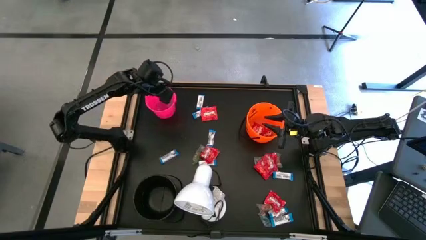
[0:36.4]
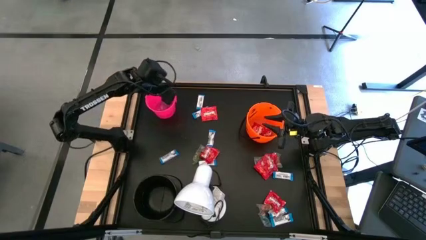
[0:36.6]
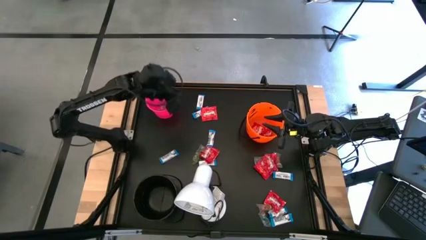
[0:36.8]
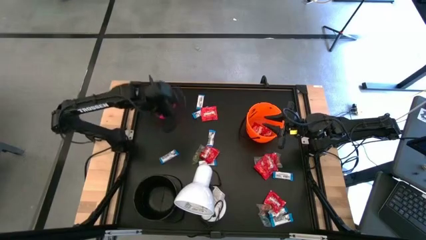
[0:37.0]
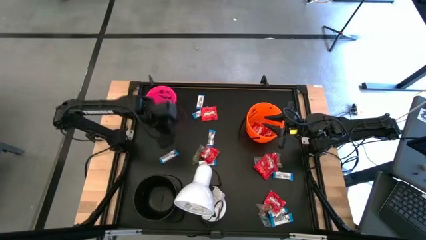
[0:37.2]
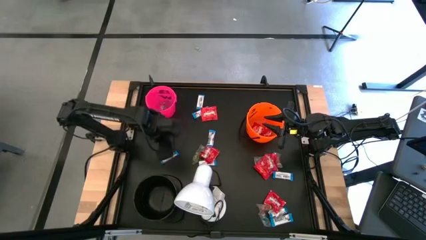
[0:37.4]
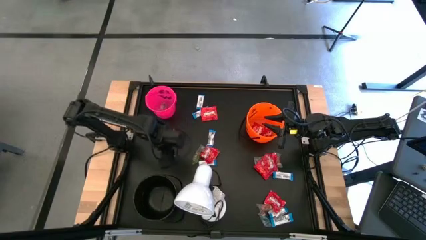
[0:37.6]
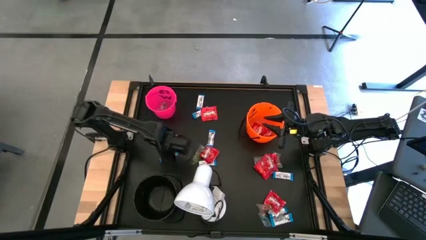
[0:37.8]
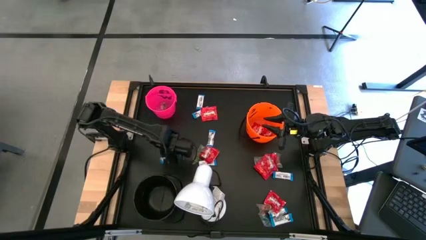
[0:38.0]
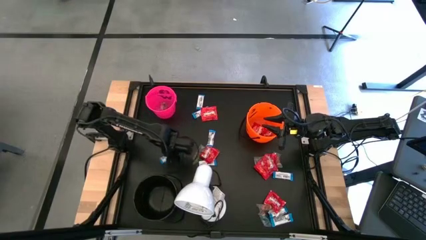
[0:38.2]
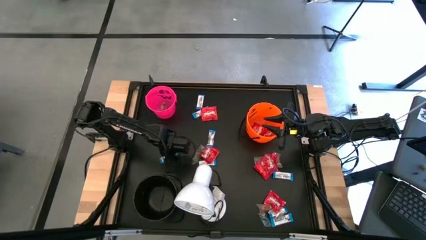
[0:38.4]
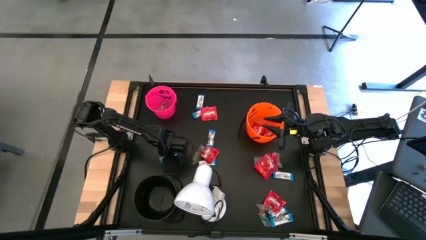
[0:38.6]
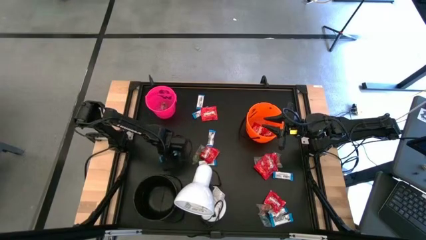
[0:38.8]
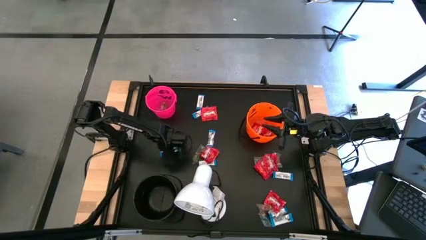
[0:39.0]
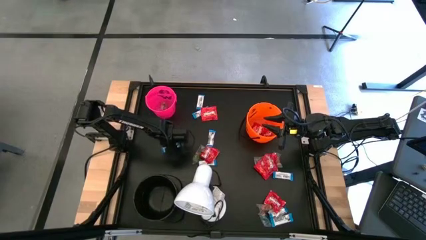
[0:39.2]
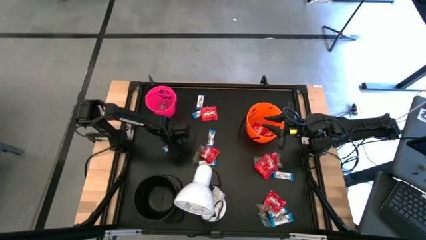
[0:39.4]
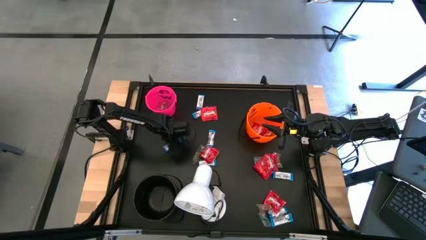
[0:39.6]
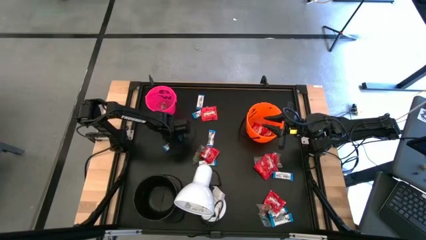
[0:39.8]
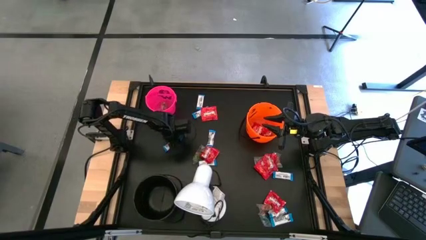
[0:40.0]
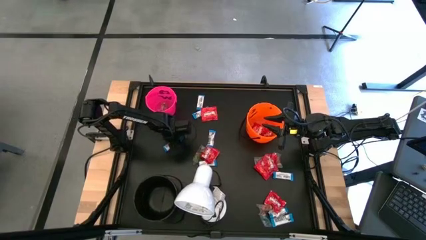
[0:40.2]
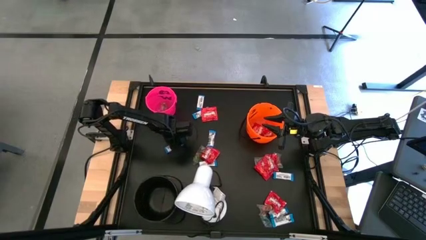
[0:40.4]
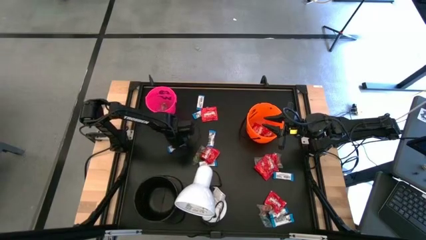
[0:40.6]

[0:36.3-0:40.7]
Task: Sort candy
Put the white chocolate into the black bucket

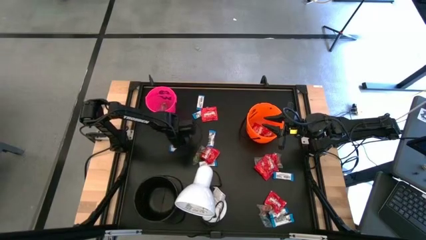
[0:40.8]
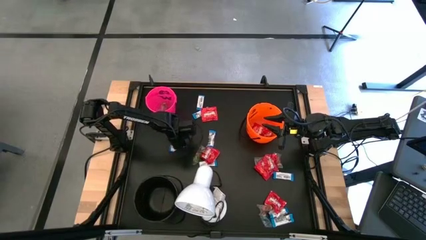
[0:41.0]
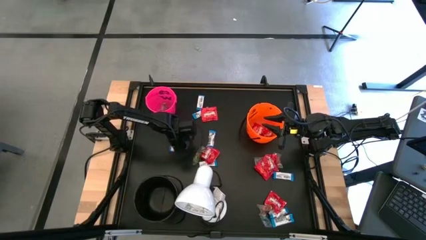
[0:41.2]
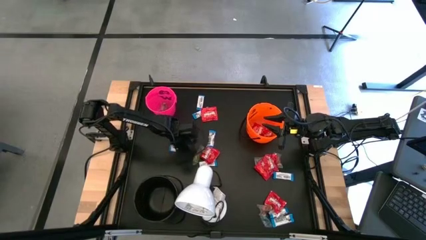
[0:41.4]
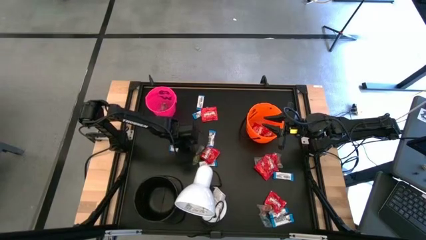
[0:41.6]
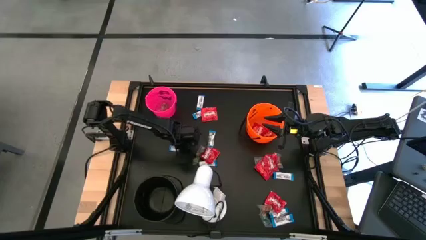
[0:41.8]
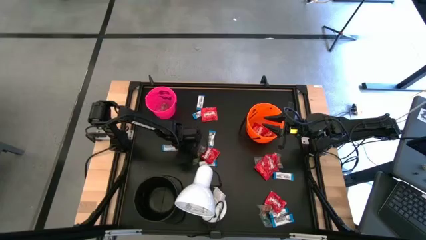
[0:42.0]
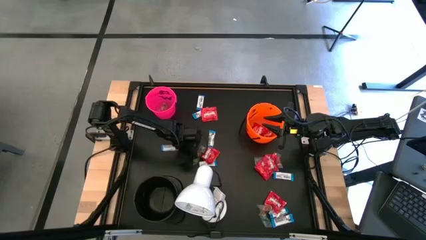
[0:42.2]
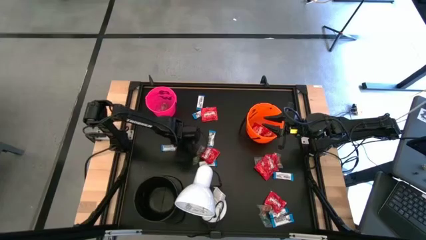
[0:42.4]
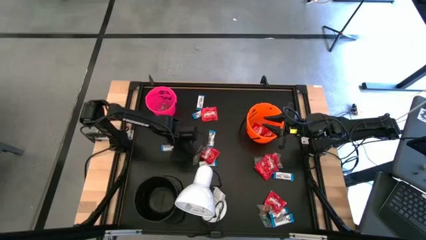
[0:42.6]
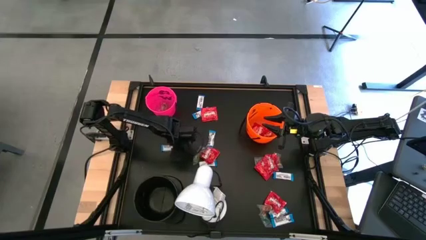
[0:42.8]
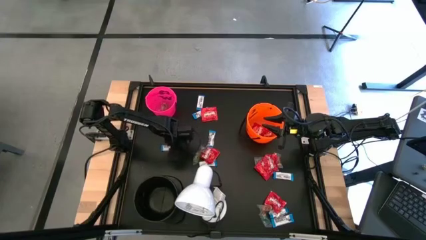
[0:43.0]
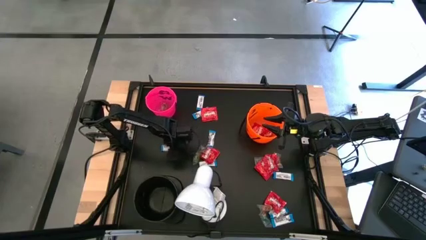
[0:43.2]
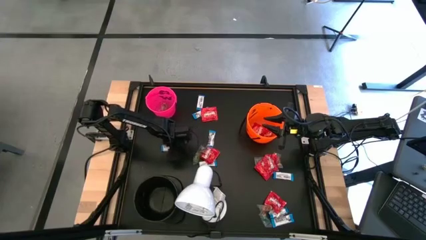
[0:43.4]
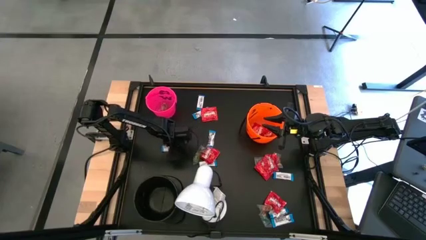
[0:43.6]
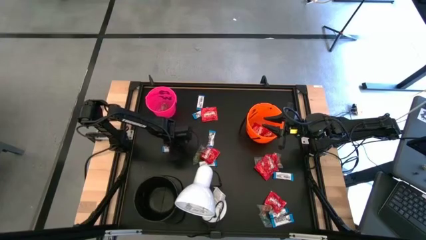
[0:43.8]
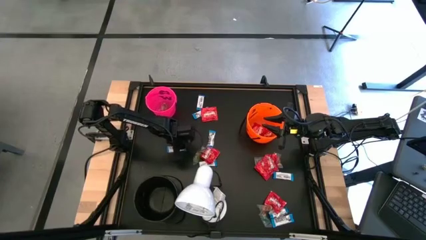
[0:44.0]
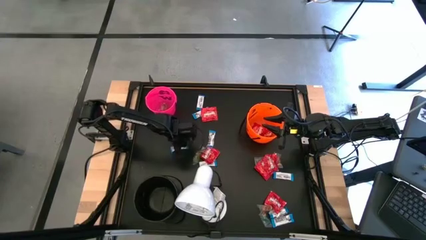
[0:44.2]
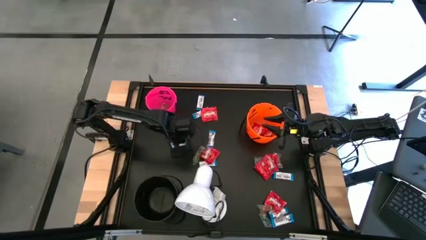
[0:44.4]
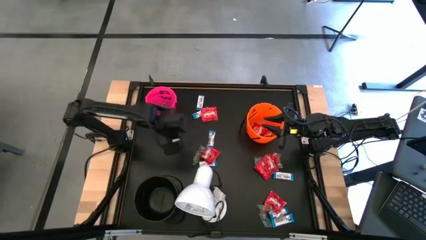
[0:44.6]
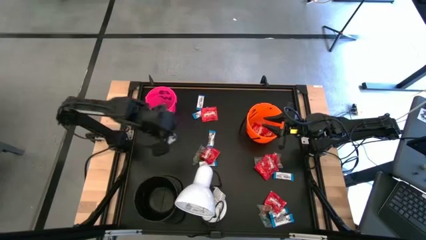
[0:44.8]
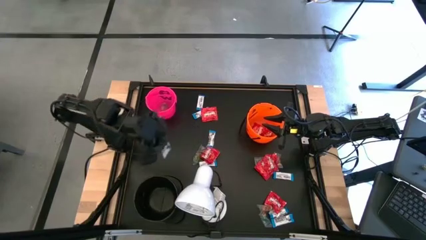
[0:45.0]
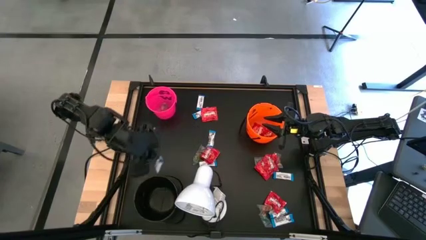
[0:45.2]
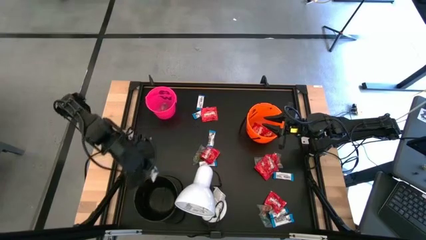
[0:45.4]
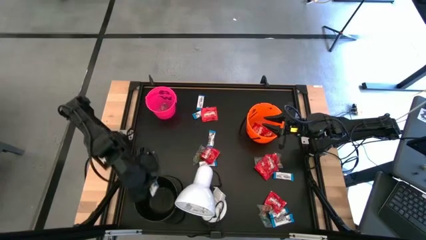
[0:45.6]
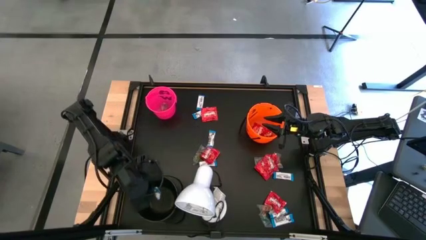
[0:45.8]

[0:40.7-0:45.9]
Put the white chocolate into the black bucket

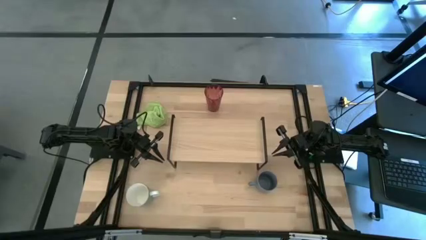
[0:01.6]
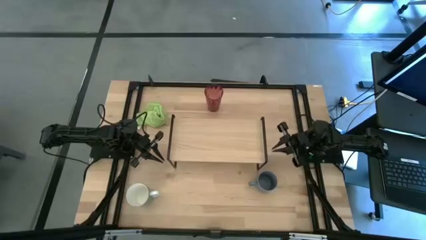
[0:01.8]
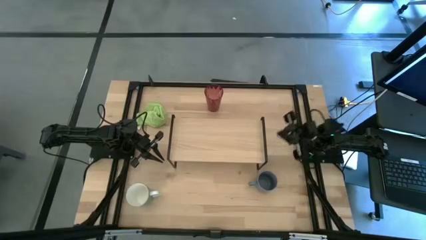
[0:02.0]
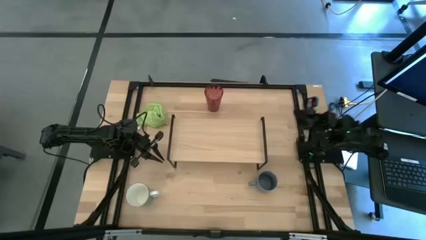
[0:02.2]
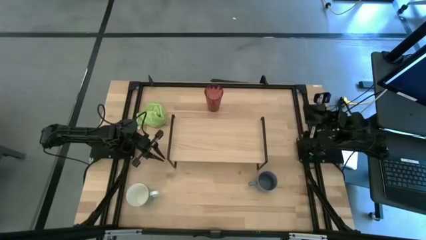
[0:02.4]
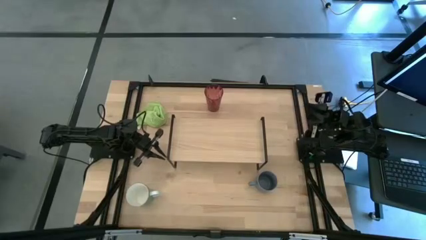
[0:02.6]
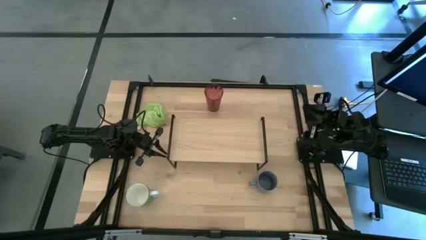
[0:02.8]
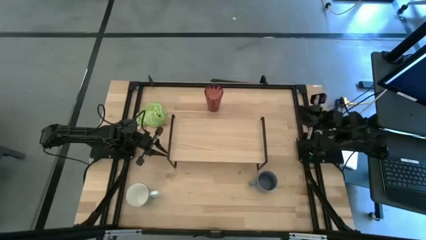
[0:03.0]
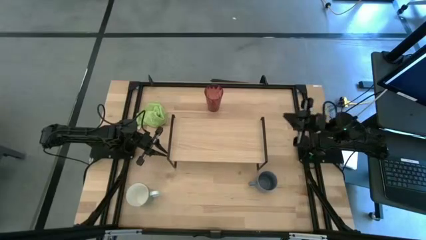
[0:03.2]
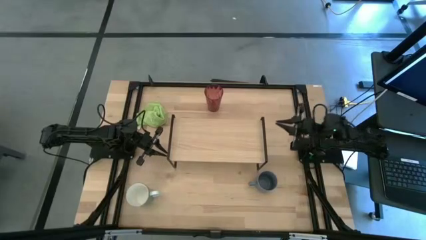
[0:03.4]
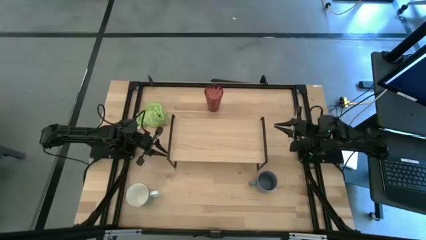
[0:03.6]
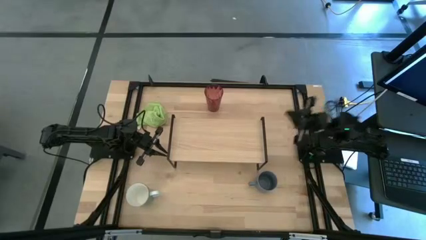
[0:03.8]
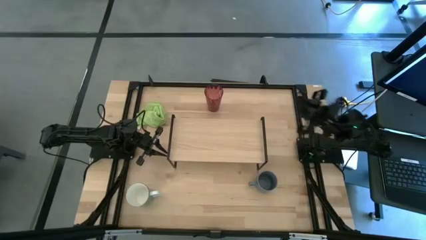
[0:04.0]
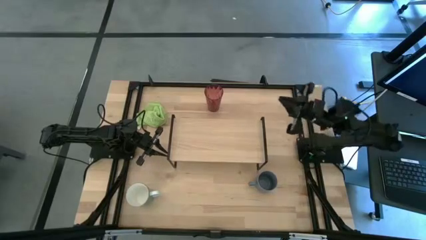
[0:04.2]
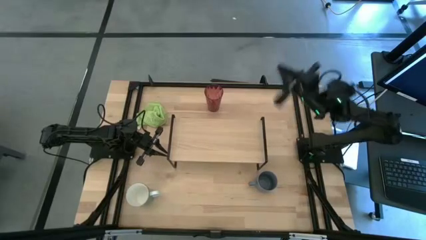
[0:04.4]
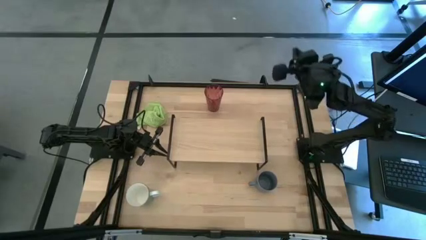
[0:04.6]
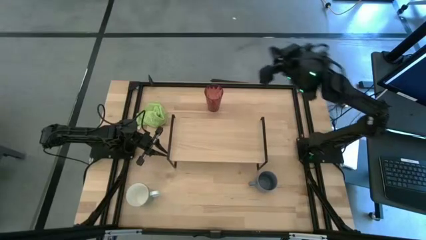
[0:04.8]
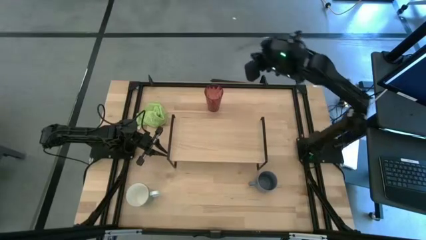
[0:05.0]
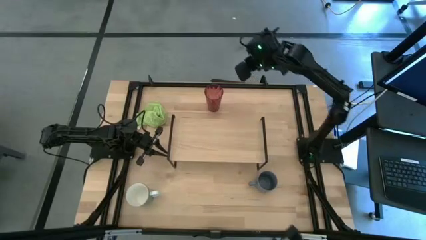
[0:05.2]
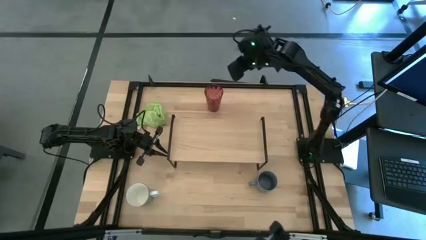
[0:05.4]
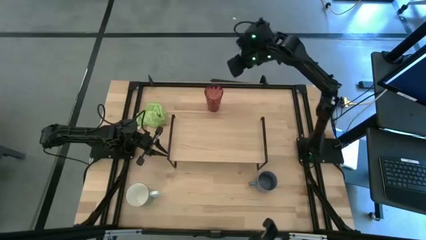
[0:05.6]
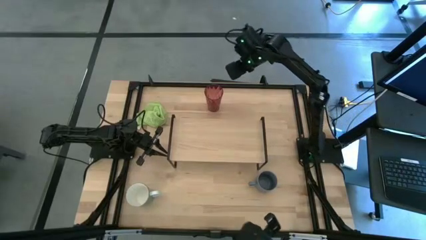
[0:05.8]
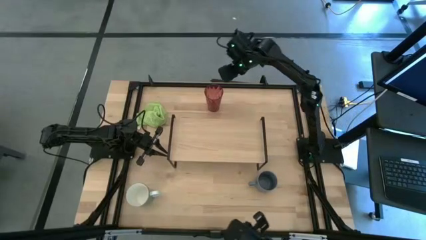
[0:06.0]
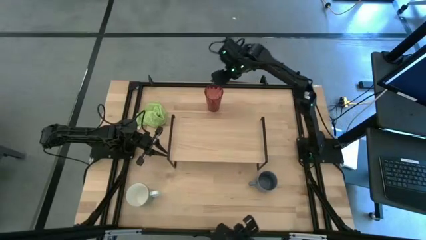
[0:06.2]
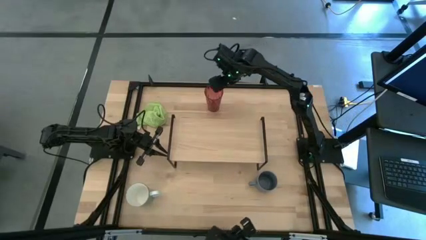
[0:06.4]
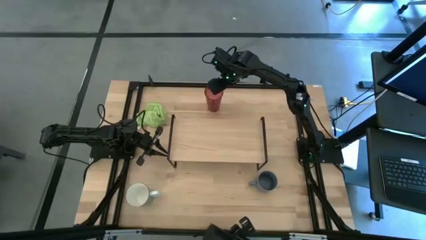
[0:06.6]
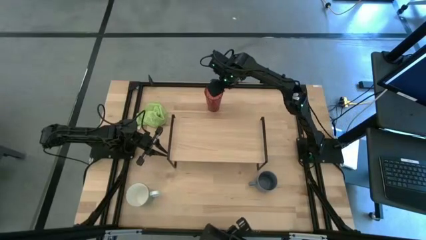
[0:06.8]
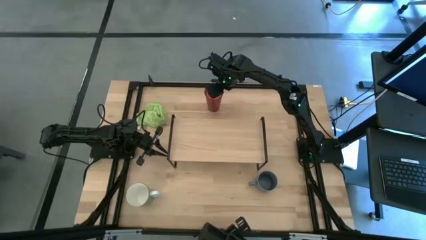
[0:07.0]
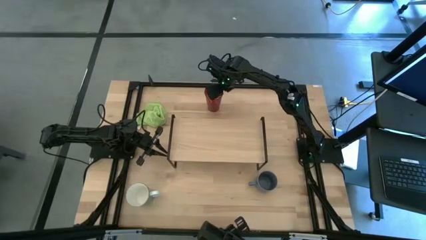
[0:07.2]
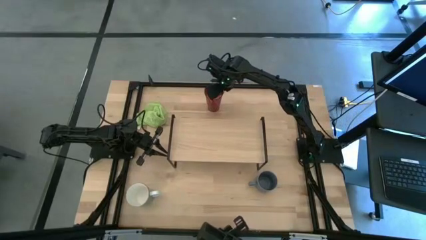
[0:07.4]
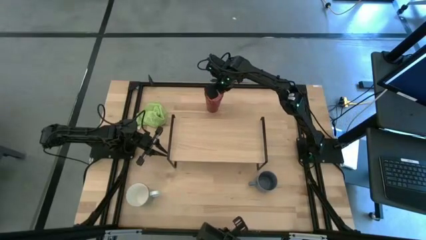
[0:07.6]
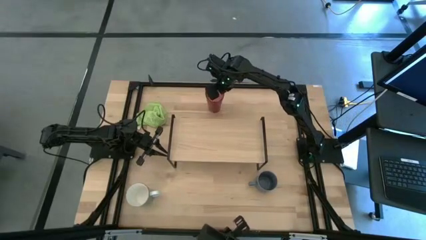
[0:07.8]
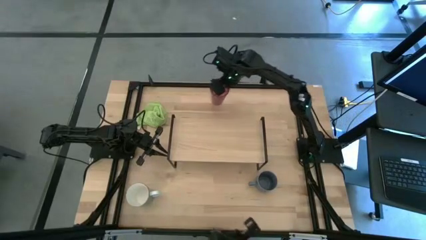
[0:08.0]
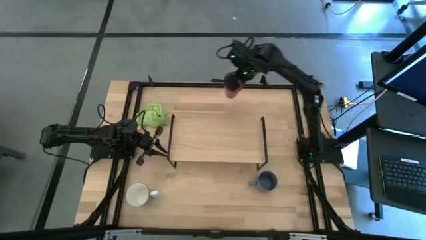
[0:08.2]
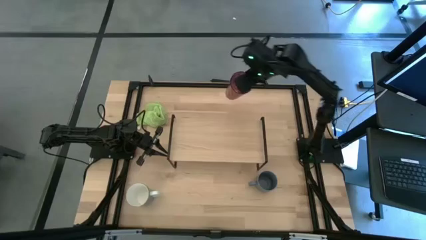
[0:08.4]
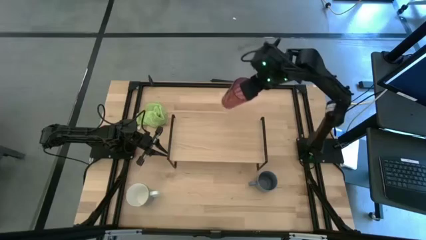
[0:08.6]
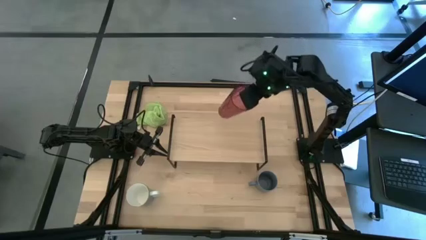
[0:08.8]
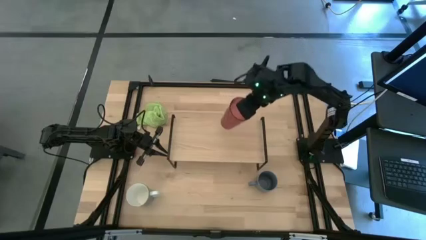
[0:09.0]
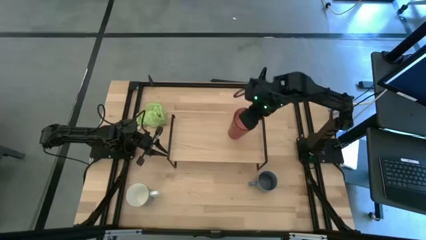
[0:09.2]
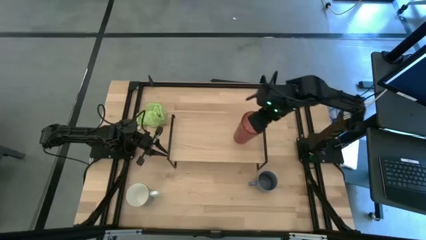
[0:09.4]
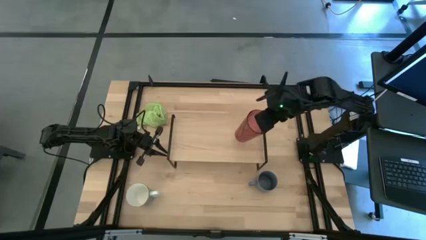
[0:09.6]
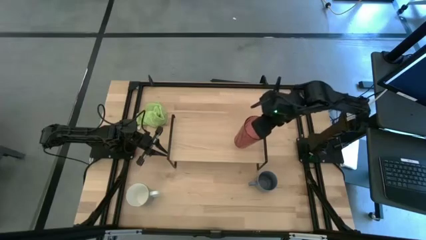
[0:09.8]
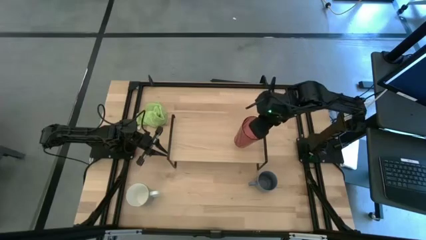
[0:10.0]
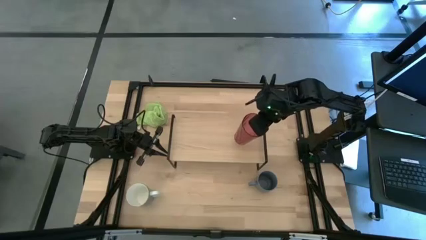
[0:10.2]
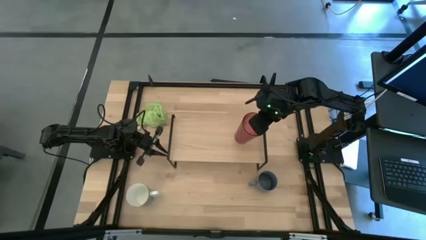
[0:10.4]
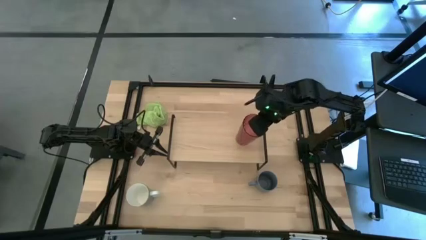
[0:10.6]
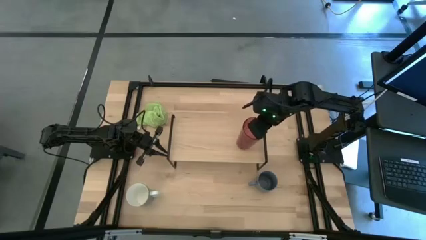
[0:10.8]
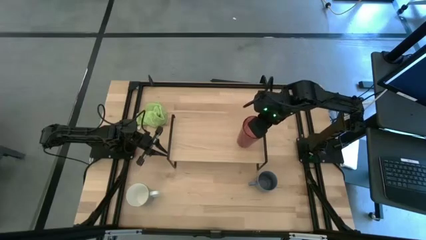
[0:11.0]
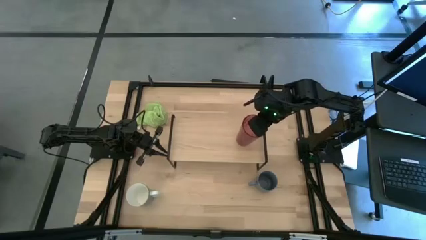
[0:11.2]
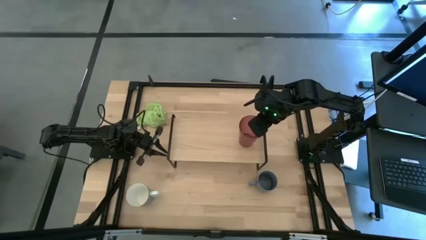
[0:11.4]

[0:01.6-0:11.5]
Task: Stack small to large cups/mugs on shelf
Put the red glass on the shelf
